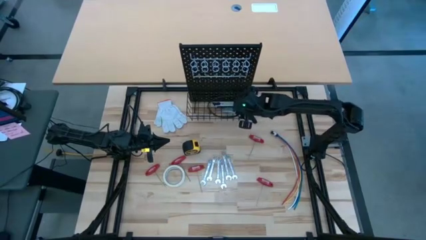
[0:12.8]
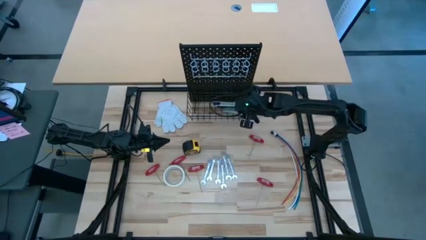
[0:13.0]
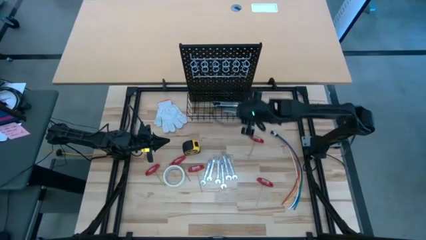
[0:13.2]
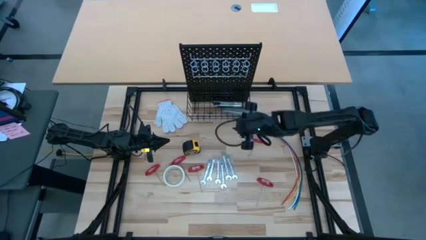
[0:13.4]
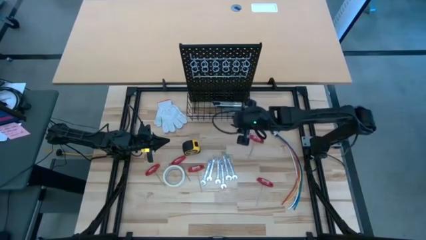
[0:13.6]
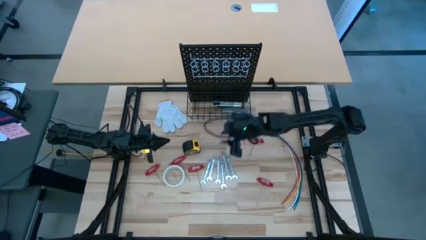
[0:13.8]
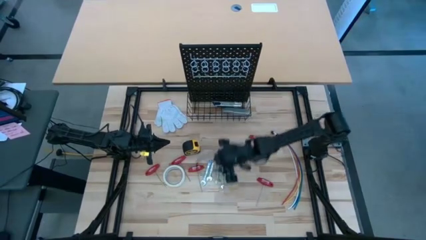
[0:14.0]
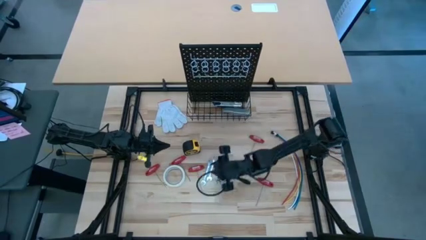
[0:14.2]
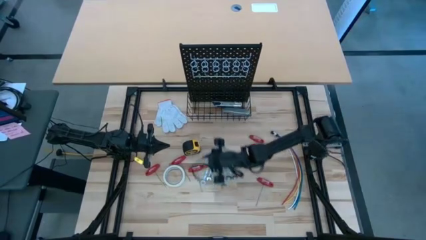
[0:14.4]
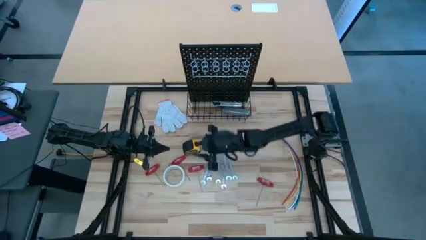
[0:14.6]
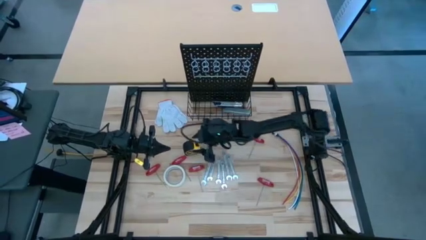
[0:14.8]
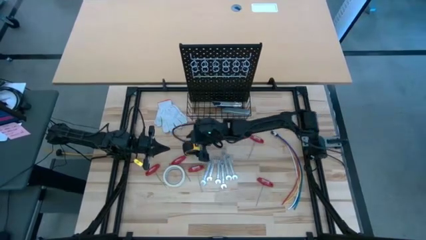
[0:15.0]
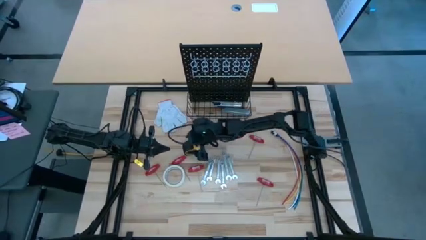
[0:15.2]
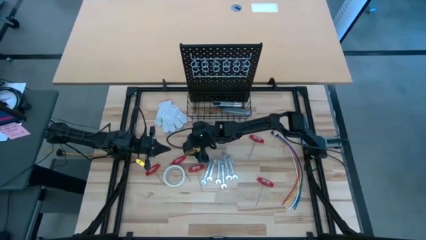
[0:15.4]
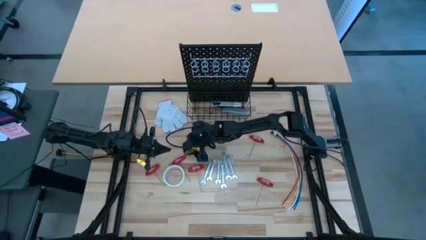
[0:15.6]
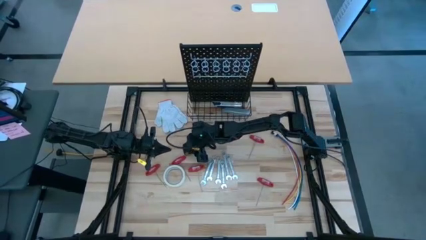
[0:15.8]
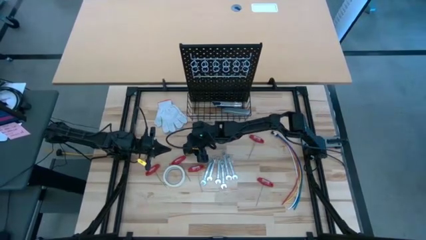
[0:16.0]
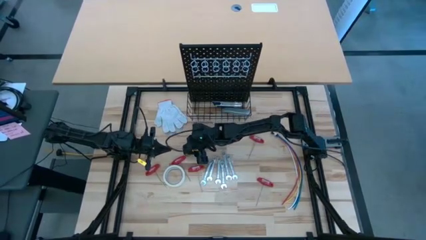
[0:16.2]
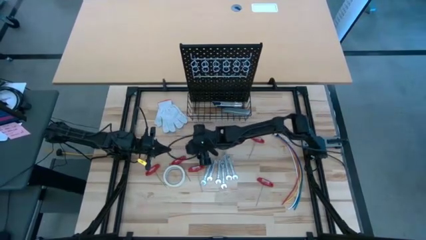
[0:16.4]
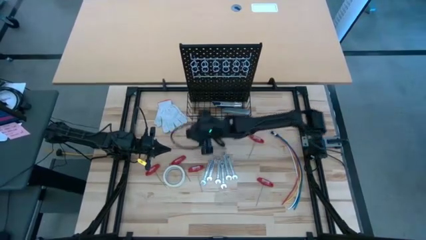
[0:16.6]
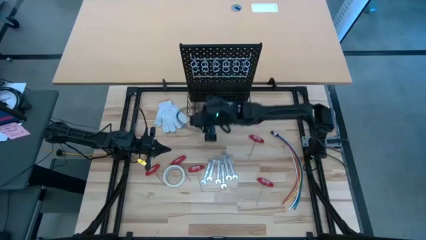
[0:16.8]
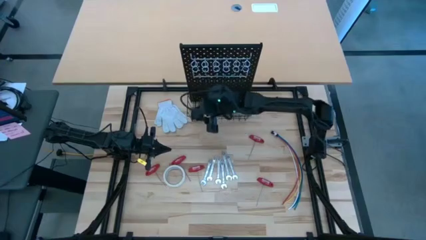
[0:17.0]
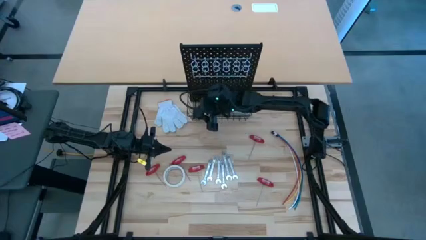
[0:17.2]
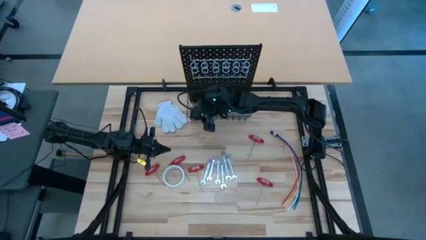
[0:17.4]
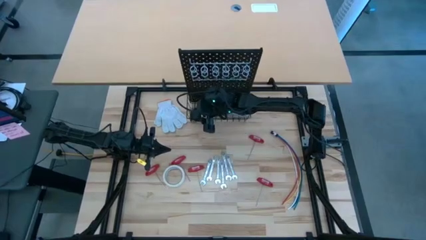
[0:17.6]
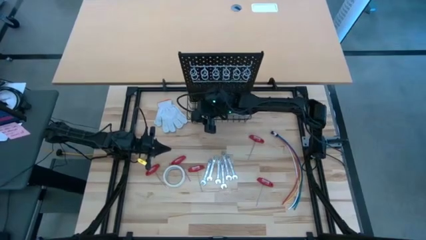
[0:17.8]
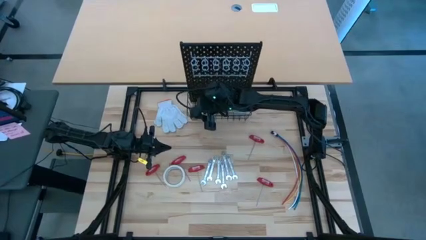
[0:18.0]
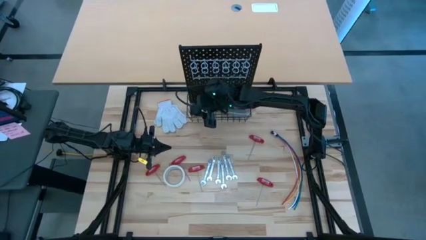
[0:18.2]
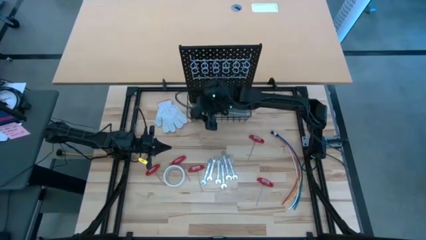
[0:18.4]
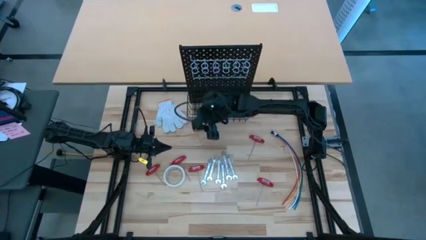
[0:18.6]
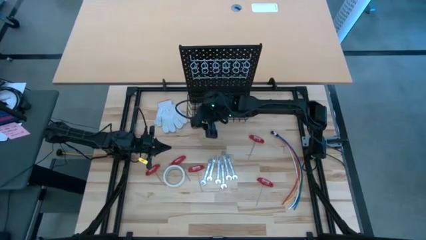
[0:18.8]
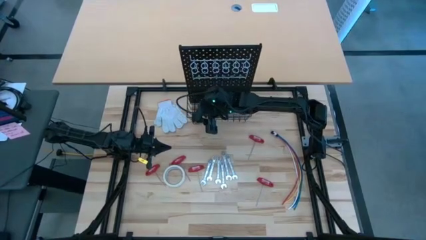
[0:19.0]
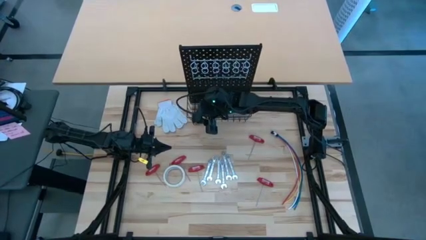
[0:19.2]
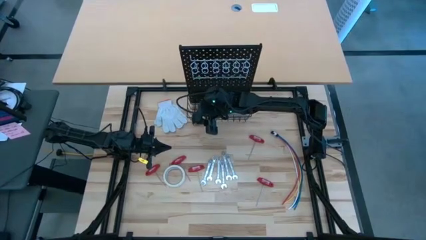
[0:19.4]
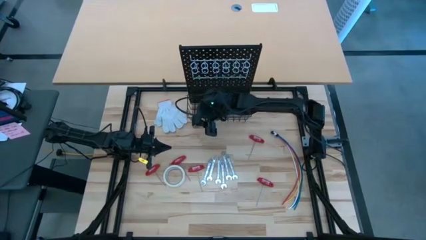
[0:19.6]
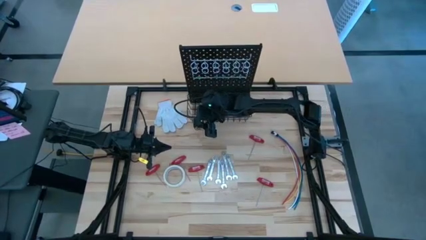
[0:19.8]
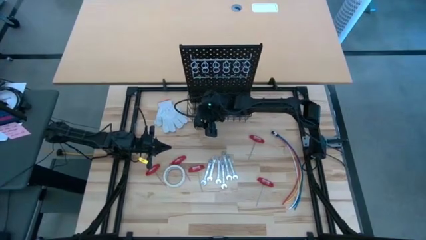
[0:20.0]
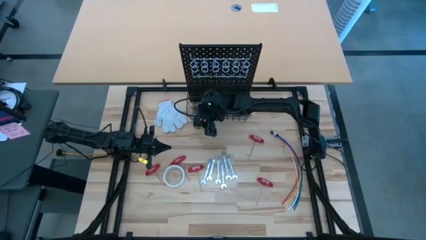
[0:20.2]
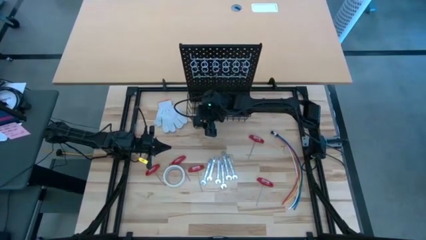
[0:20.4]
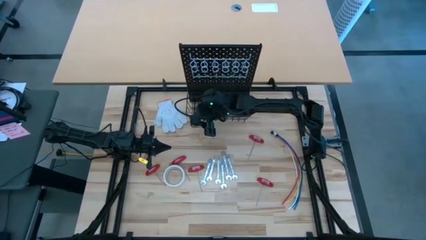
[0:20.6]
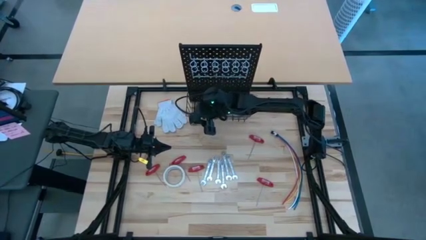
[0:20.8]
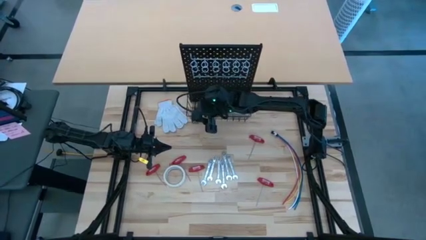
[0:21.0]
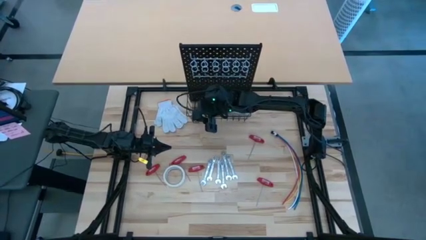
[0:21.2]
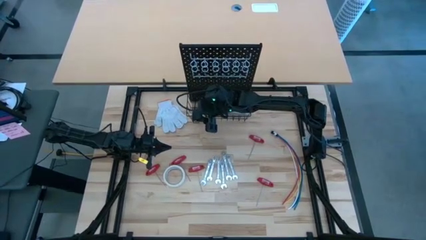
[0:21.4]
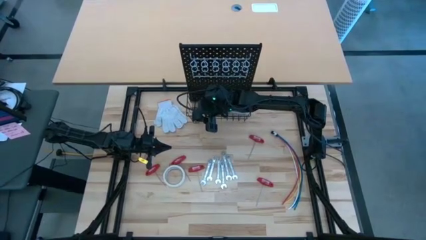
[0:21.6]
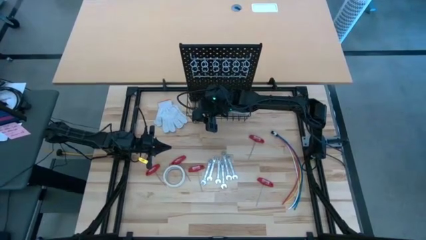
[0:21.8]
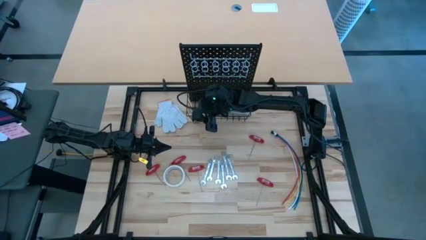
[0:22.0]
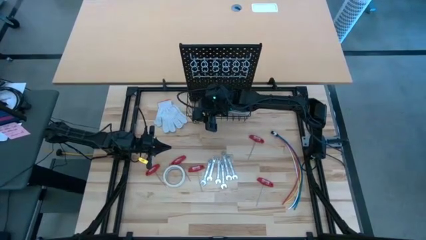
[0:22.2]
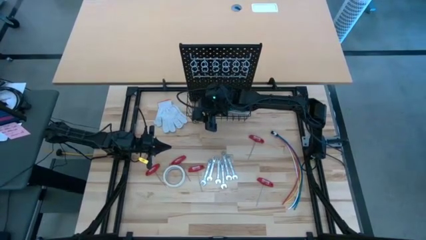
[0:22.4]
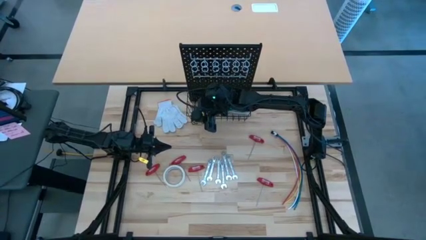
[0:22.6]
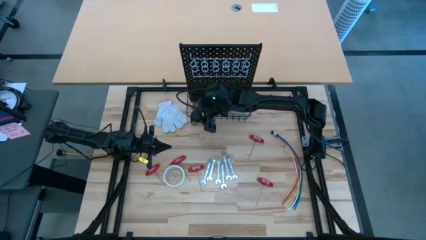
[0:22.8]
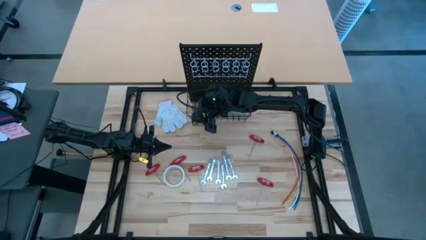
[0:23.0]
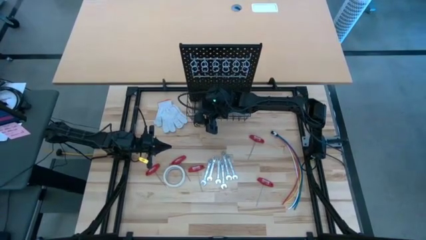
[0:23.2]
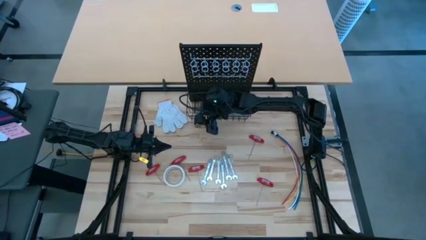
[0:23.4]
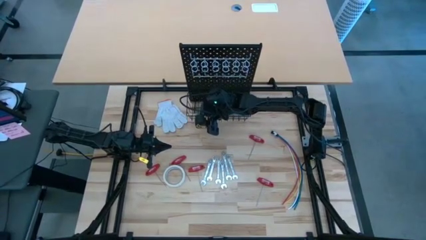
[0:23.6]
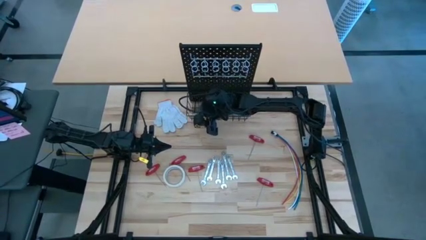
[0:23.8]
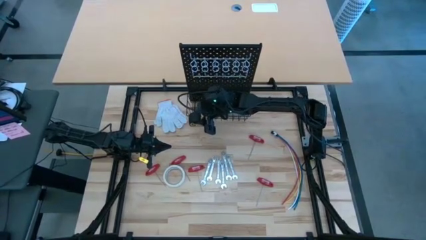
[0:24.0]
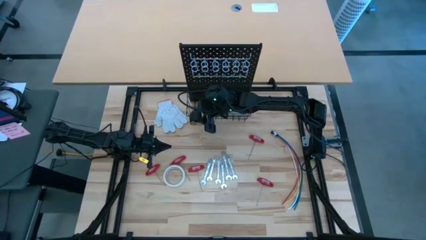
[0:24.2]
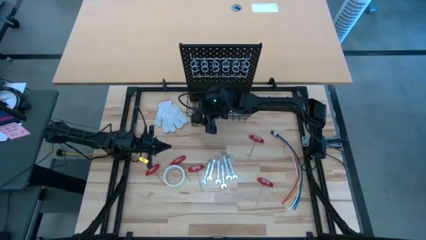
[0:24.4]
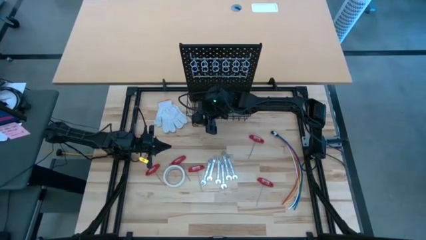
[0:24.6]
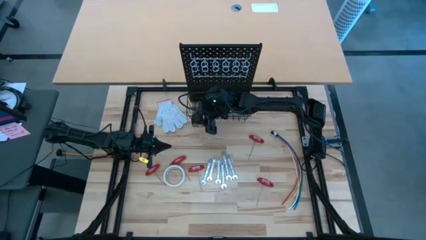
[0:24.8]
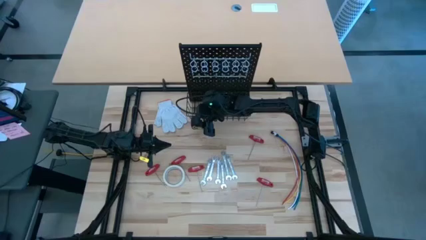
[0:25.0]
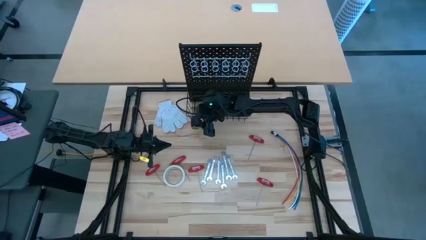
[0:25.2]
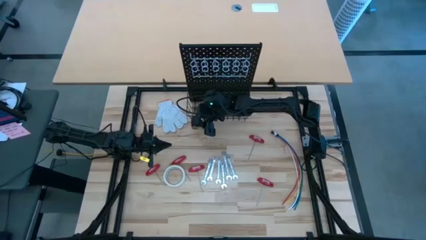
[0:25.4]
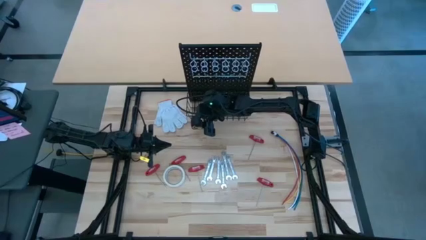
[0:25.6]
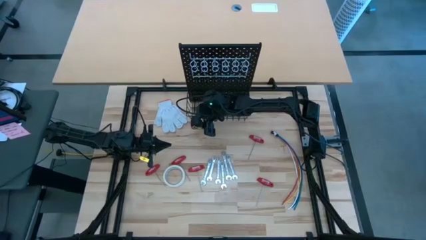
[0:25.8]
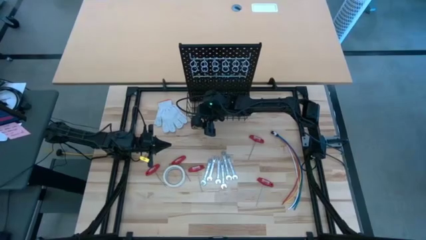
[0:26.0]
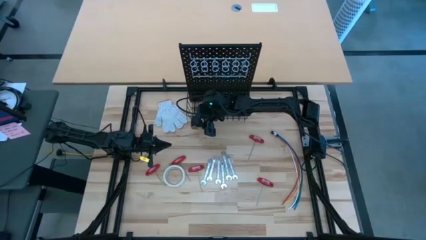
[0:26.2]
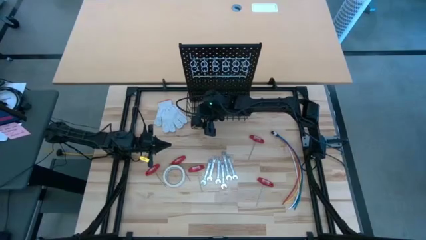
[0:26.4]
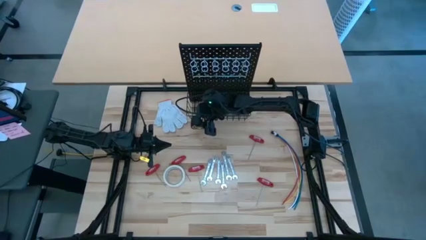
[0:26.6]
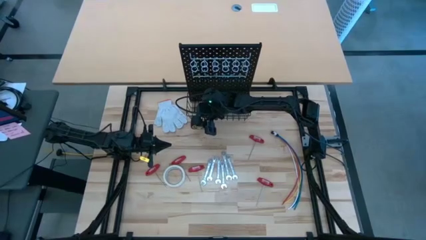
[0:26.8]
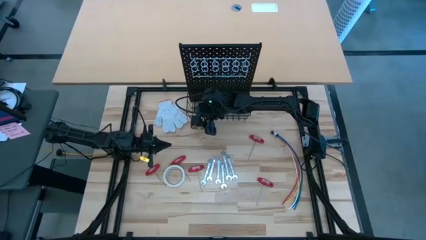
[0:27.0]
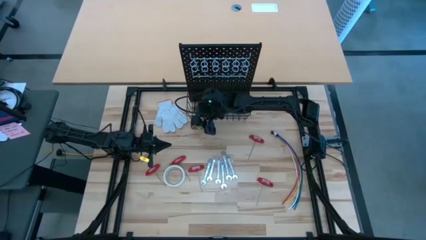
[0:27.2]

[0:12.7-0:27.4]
Task: Hang tools onto peg board
Hang the black-yellow measuring tape on the wire basket on the pegboard
